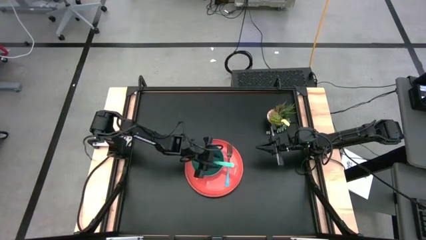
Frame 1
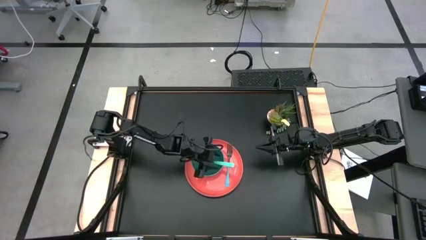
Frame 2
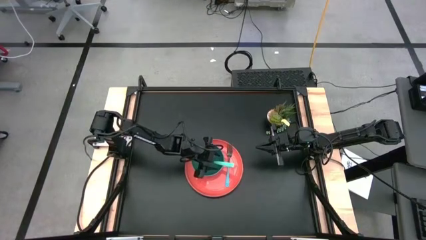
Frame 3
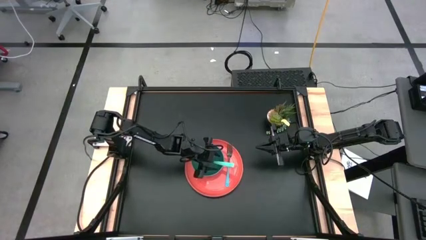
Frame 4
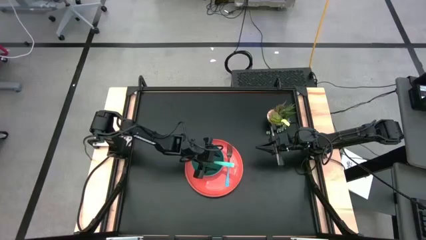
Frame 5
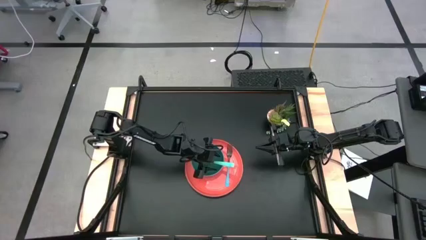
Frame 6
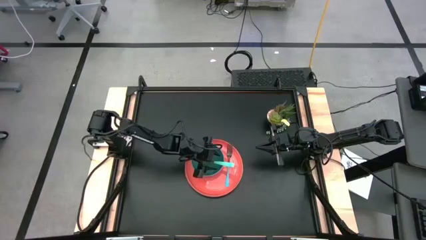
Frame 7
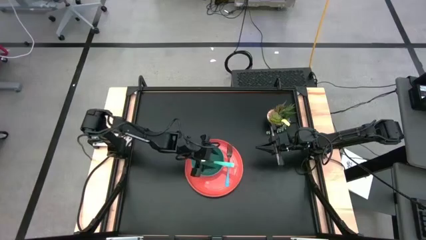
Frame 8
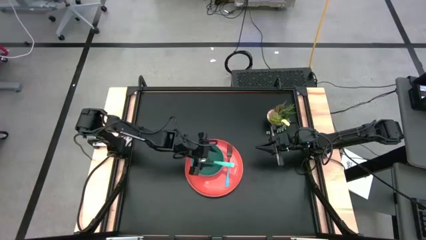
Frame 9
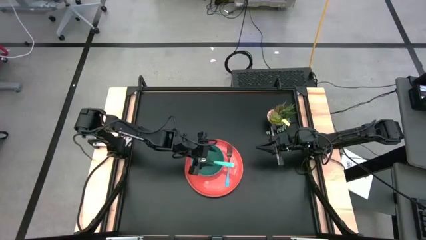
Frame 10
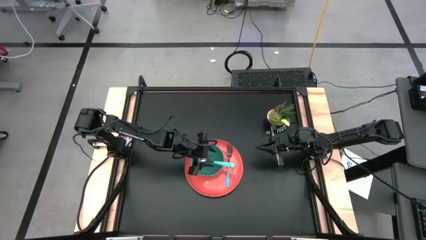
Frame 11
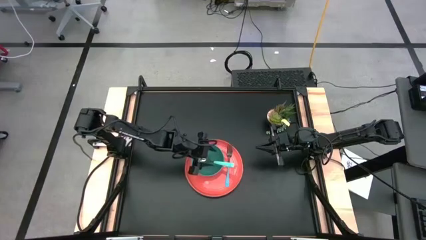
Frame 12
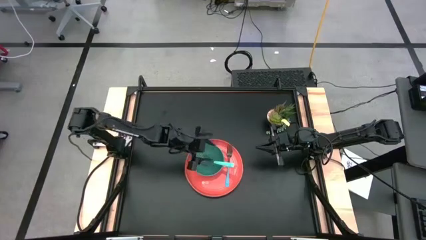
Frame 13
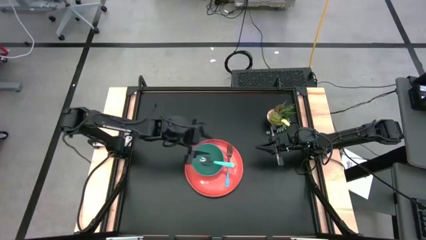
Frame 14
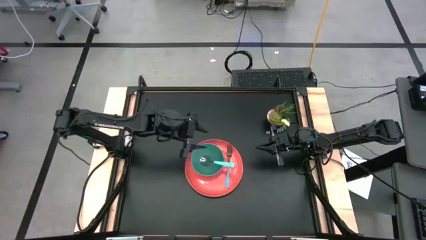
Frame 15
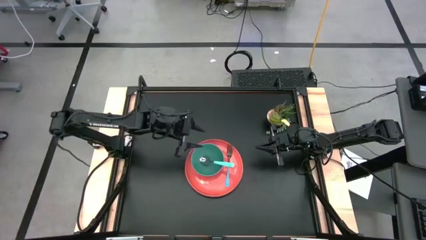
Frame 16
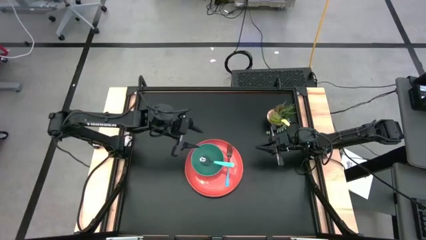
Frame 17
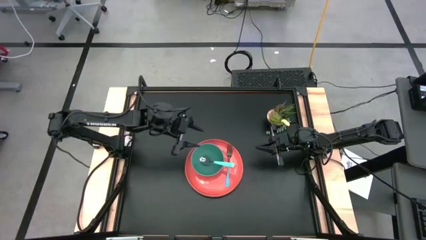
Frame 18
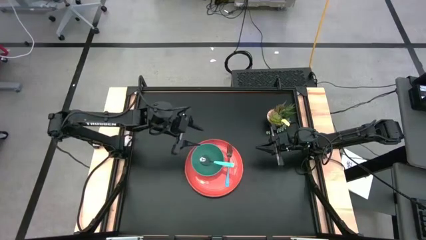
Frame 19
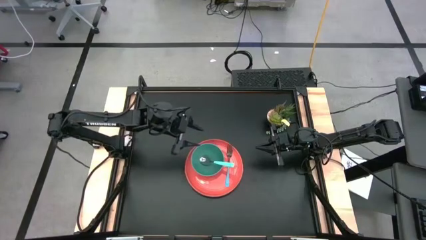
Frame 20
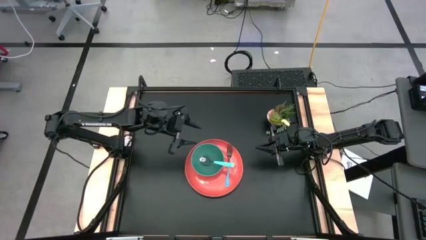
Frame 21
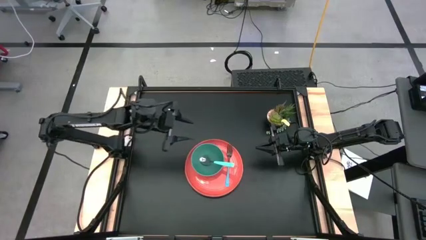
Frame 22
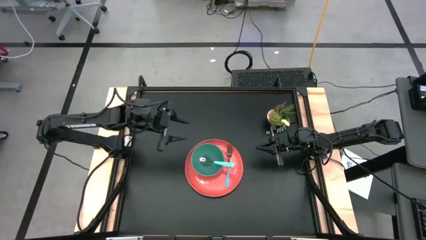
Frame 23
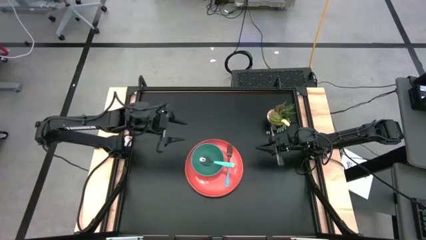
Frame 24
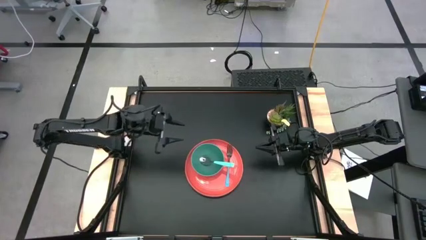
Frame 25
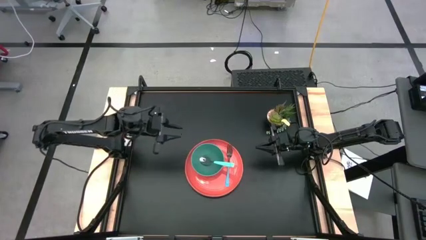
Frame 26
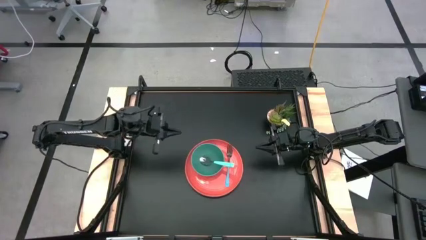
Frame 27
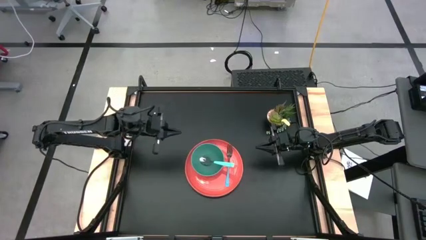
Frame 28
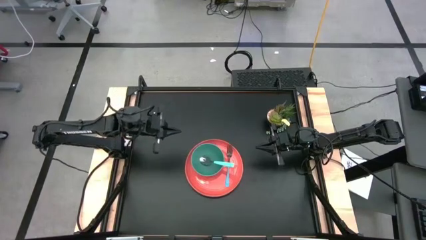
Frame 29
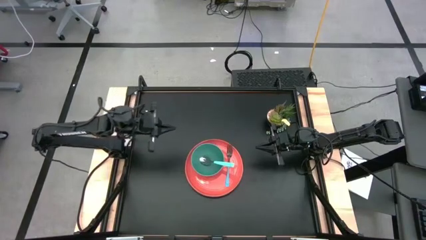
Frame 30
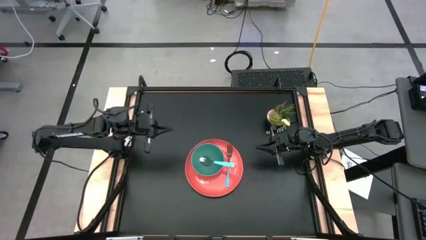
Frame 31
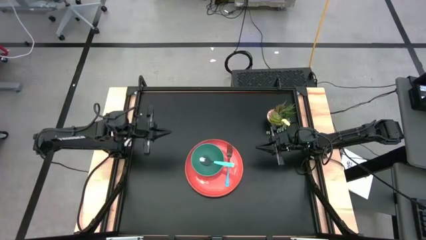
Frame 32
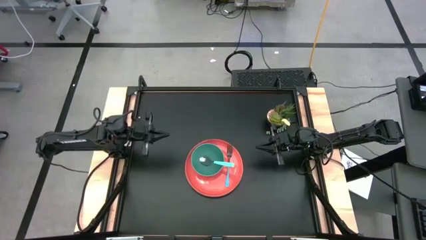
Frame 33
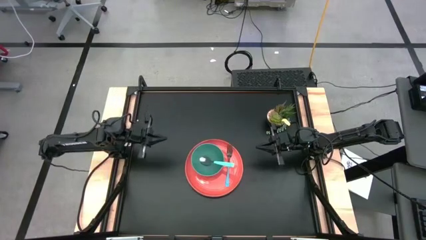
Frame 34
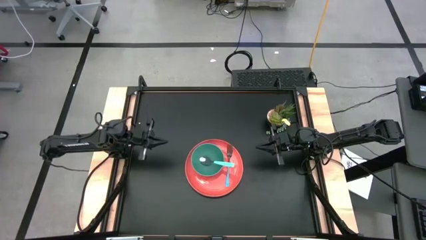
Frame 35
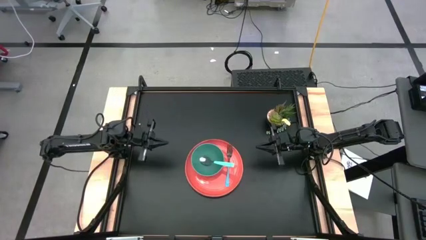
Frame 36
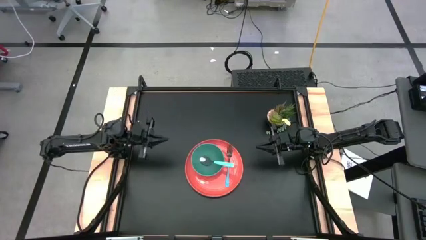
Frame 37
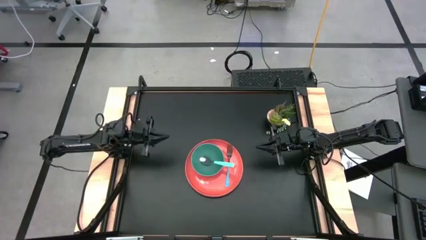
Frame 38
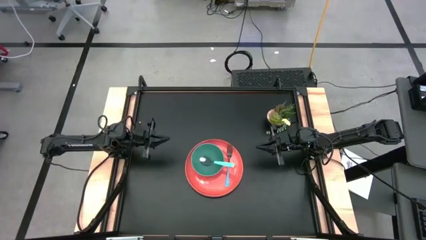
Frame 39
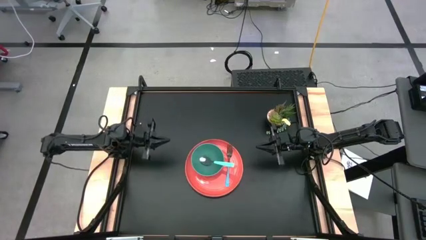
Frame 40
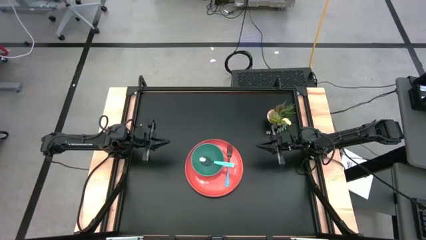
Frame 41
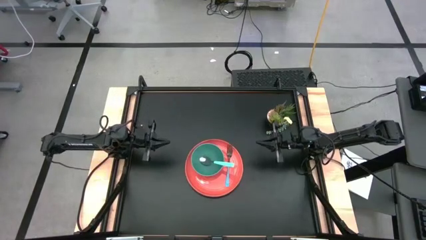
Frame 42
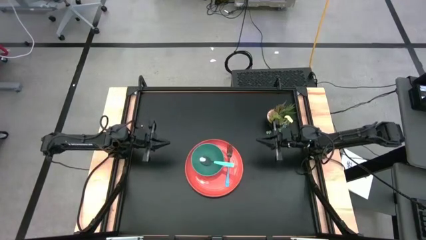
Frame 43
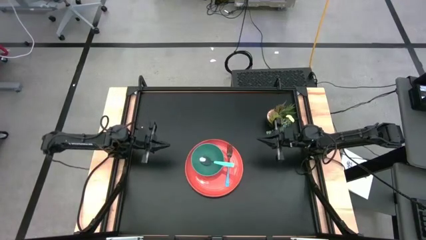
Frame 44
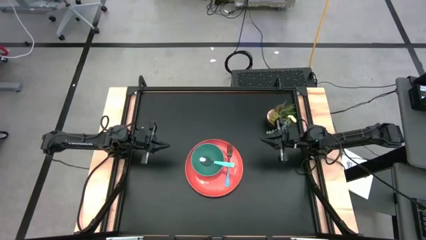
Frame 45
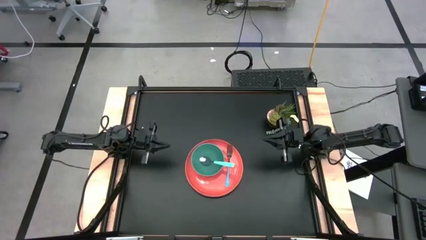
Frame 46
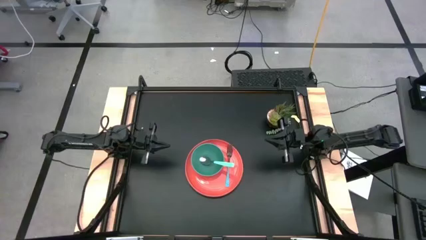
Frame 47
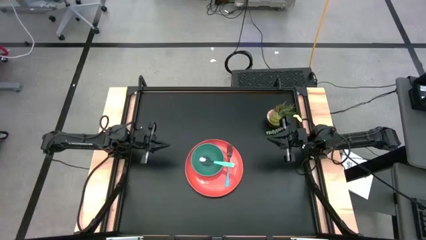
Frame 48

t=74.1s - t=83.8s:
Task: Set table place
Return to Home Position

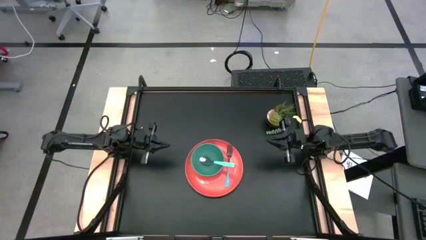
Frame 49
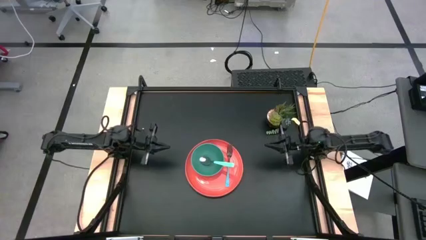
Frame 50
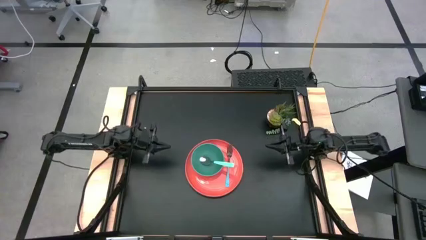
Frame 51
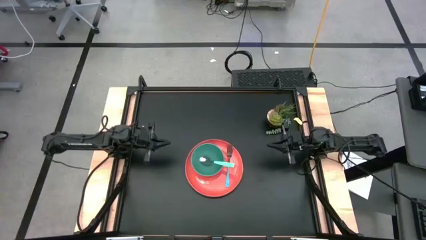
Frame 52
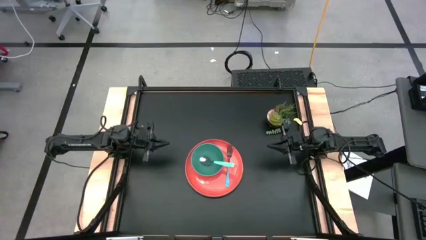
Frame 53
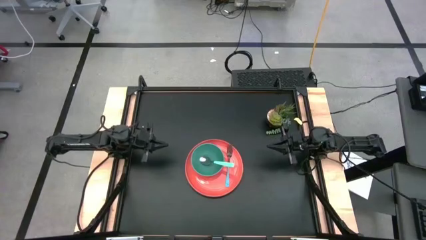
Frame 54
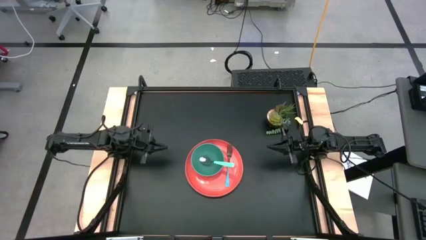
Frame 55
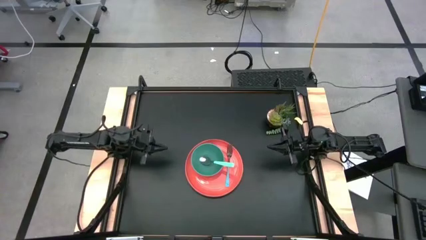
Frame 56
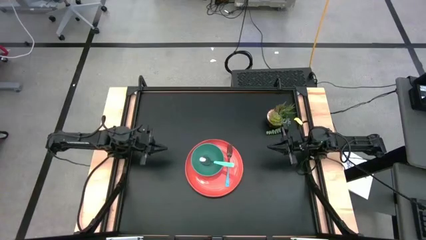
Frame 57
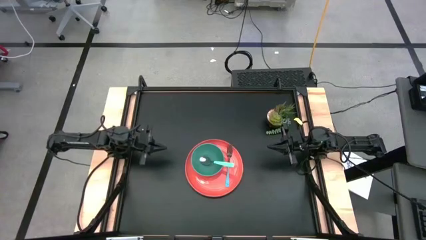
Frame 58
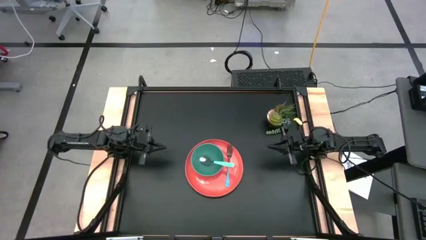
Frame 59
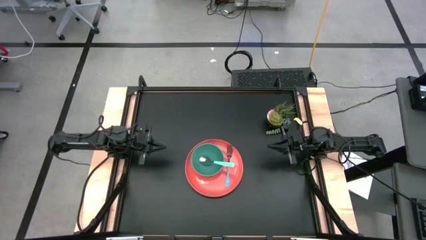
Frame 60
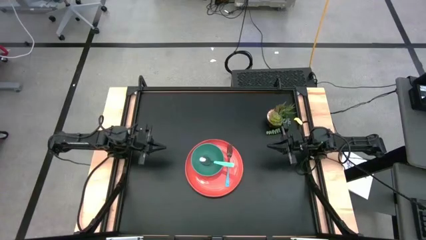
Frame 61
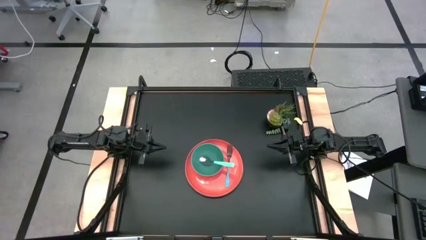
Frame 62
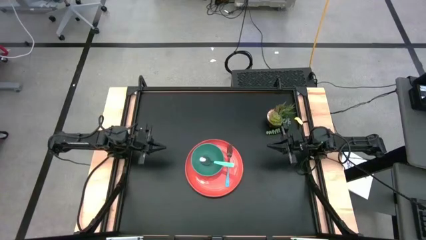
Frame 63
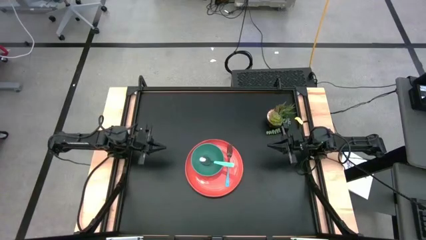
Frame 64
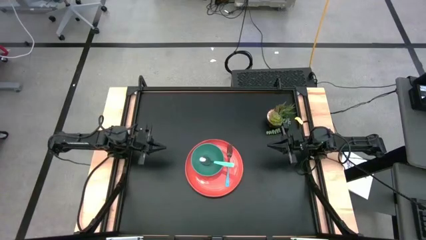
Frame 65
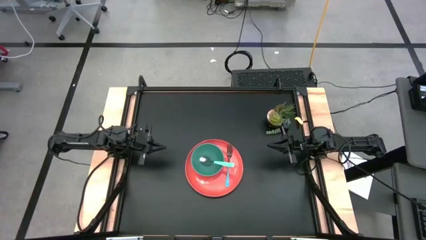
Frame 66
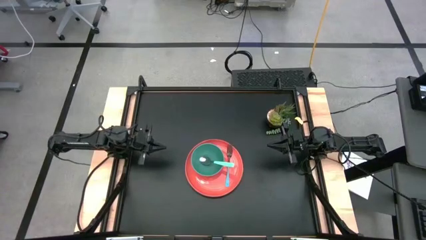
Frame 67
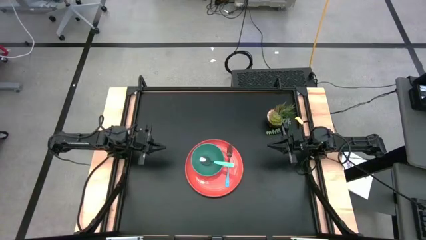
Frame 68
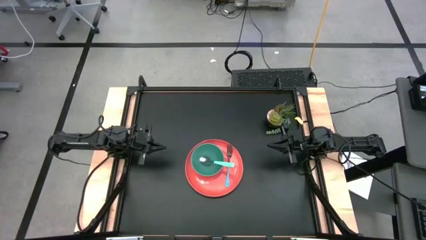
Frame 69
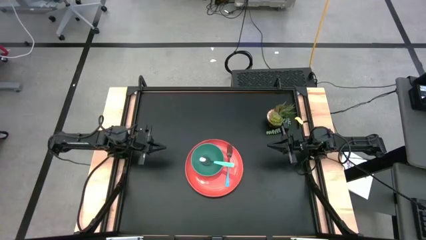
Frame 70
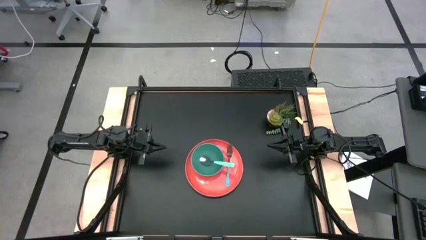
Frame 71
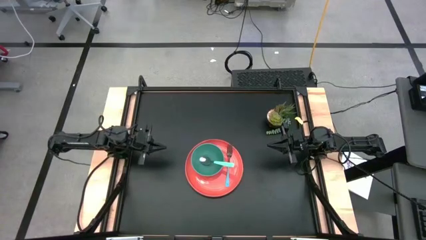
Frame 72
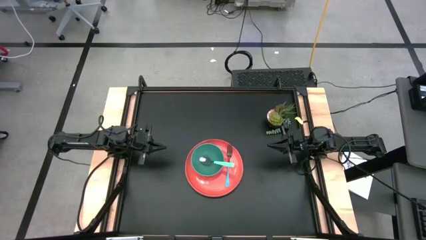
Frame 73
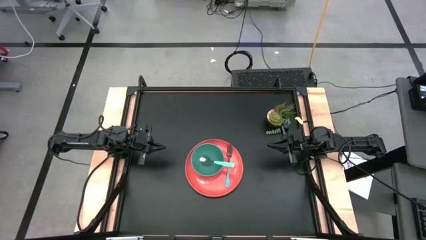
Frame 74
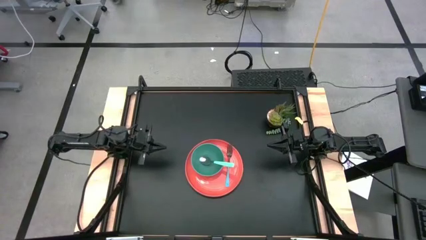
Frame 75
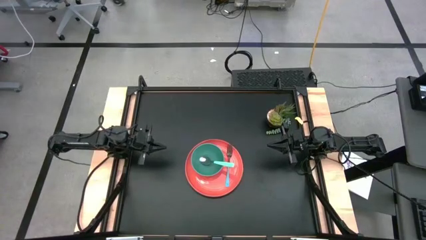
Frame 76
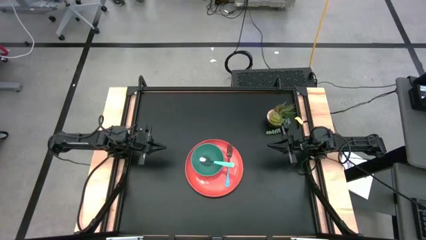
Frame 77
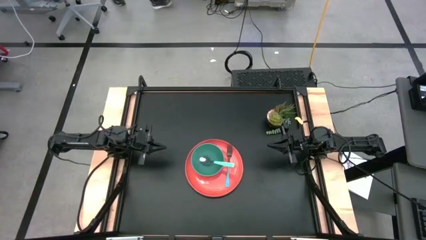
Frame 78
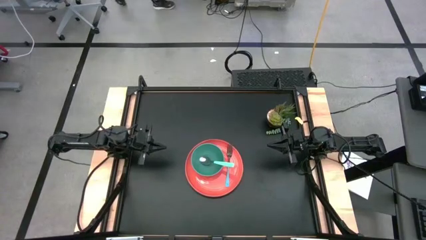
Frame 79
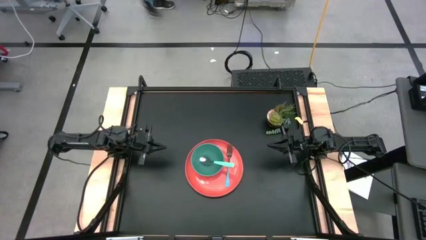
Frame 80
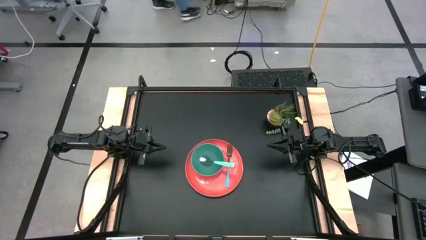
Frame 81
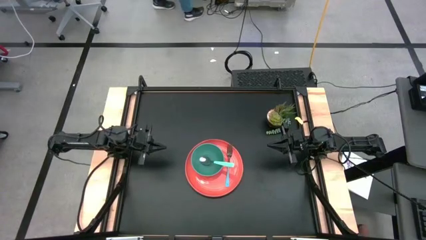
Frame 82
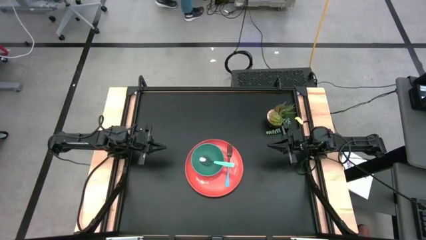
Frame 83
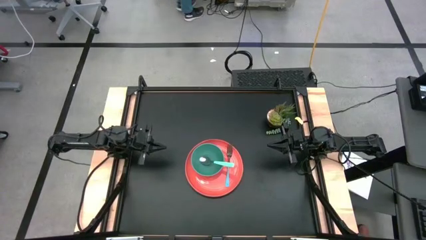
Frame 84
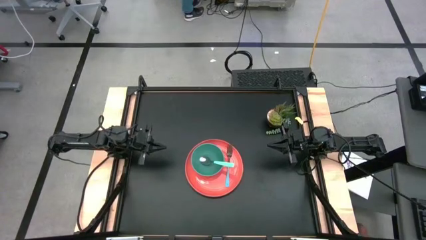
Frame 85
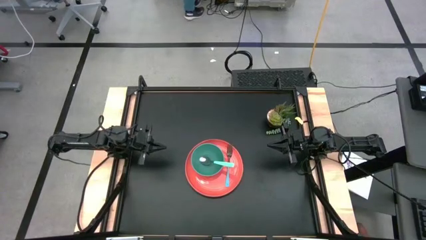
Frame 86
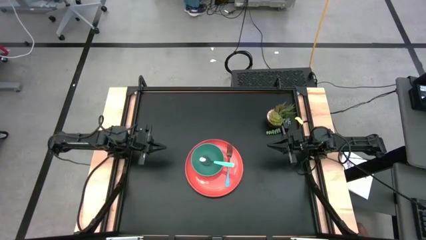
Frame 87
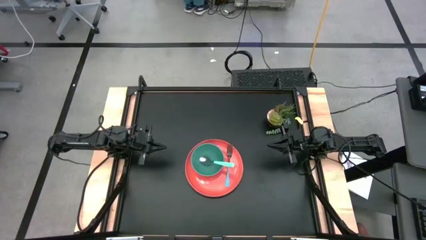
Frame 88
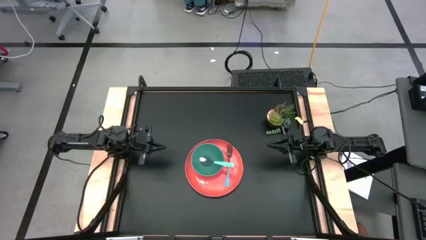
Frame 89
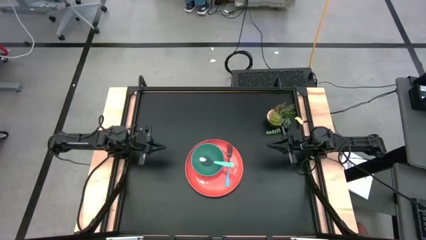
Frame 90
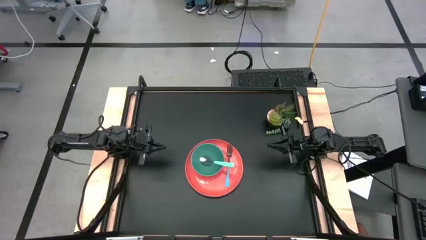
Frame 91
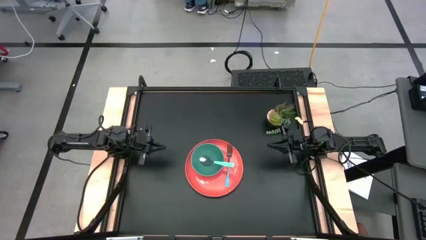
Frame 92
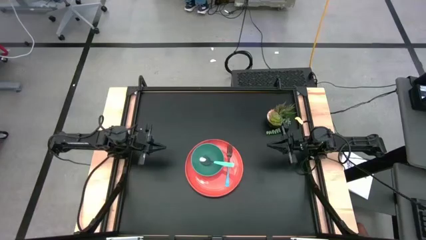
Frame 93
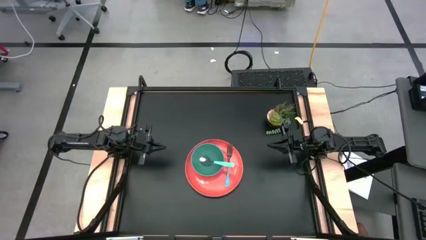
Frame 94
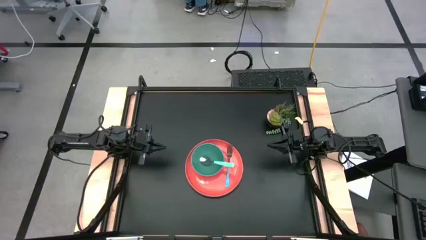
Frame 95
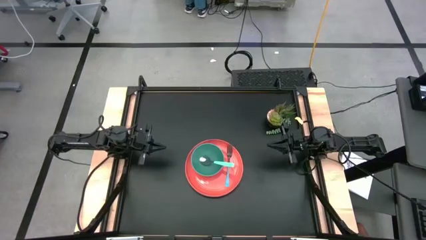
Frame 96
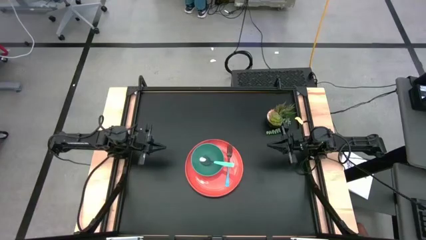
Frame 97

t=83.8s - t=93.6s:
Return to Home Position
